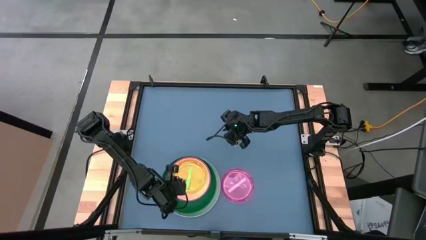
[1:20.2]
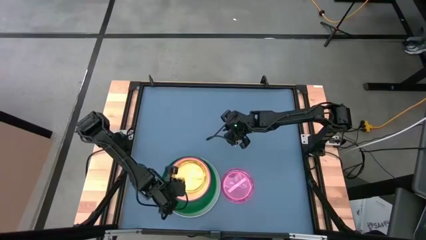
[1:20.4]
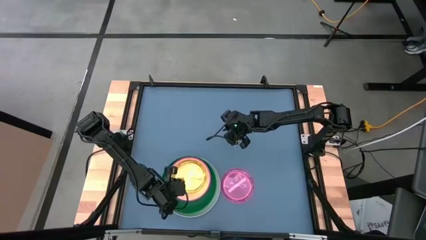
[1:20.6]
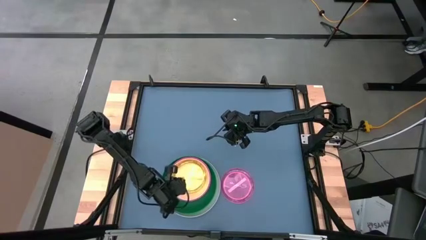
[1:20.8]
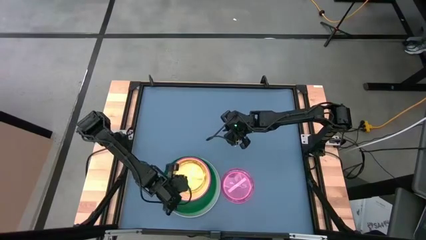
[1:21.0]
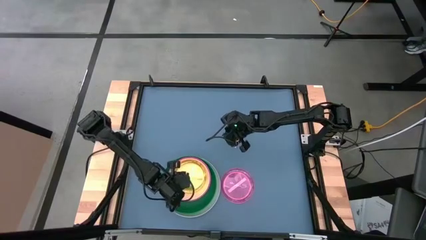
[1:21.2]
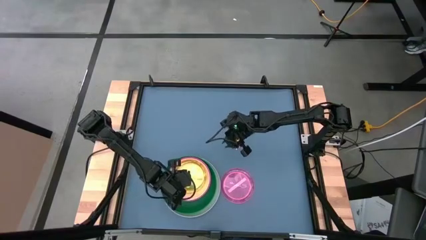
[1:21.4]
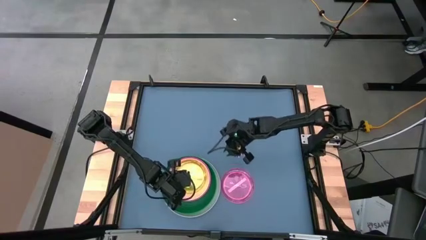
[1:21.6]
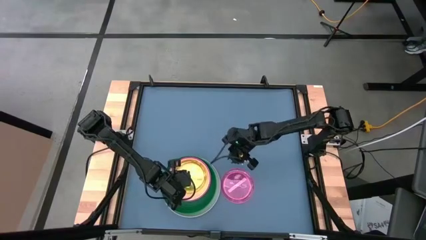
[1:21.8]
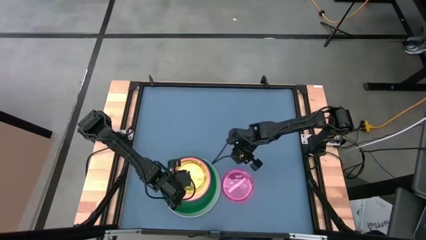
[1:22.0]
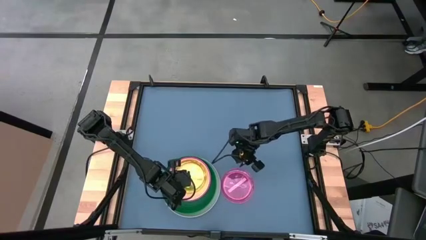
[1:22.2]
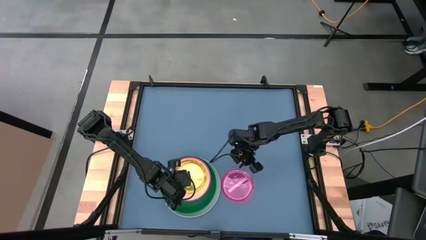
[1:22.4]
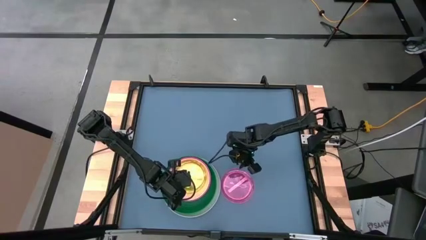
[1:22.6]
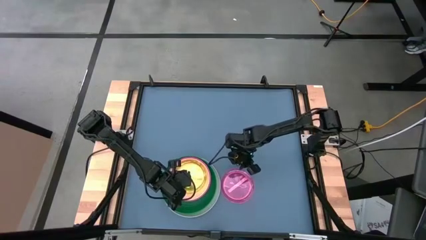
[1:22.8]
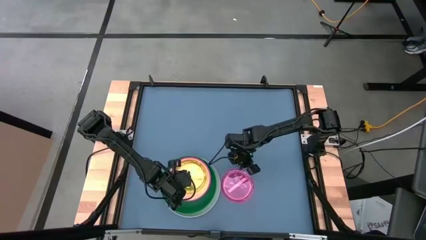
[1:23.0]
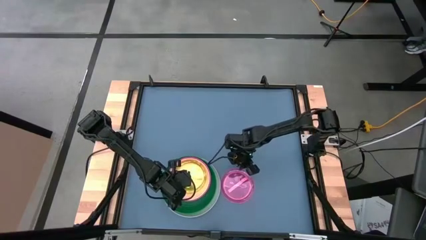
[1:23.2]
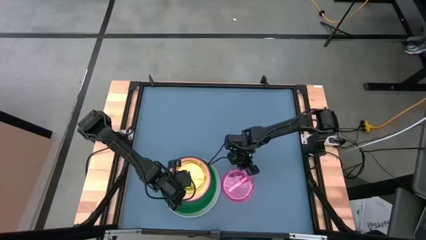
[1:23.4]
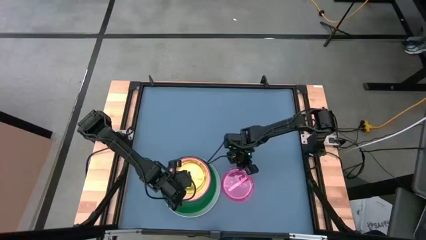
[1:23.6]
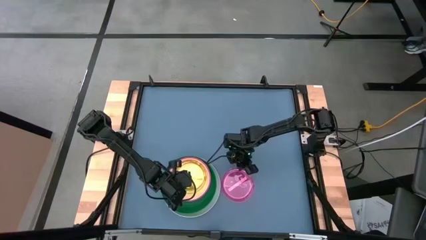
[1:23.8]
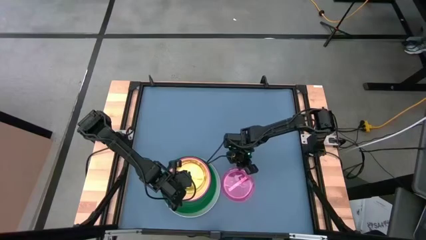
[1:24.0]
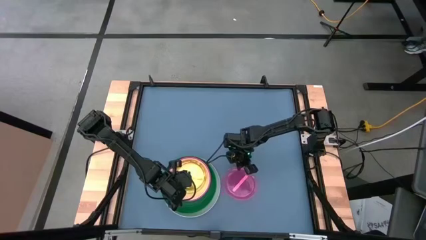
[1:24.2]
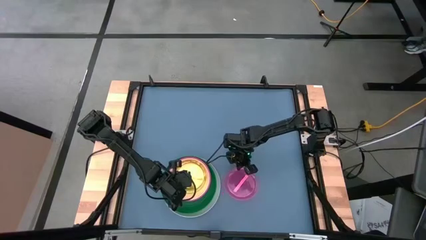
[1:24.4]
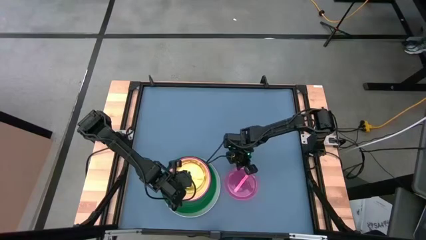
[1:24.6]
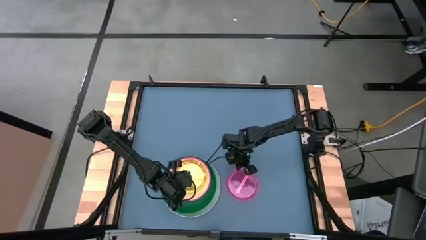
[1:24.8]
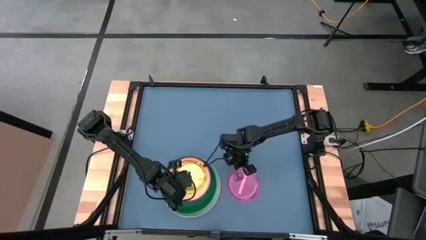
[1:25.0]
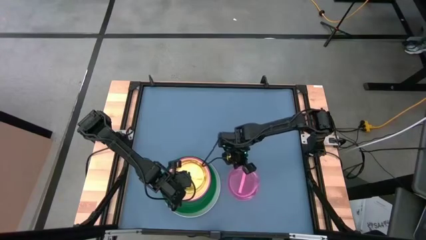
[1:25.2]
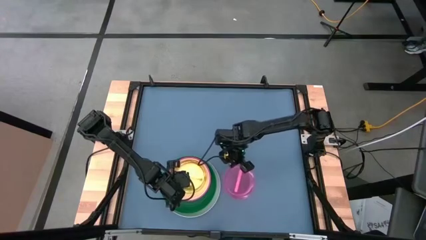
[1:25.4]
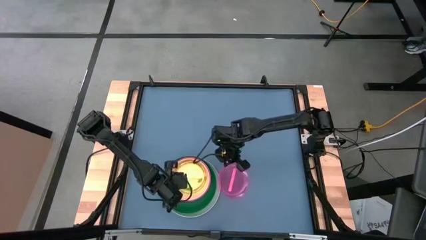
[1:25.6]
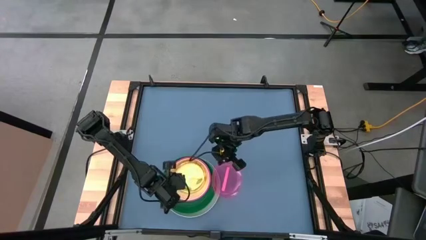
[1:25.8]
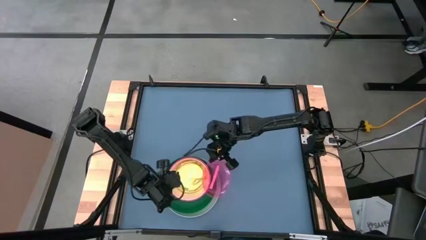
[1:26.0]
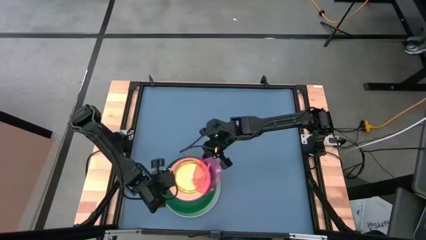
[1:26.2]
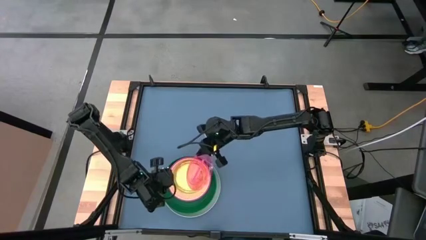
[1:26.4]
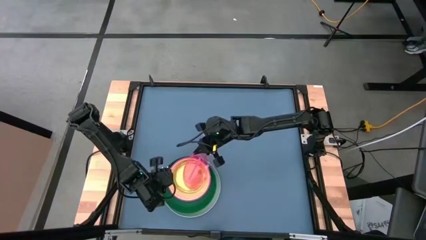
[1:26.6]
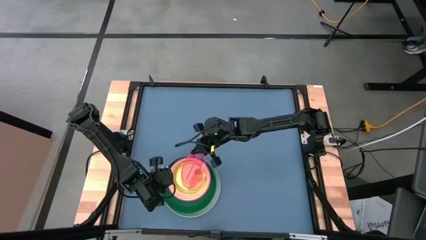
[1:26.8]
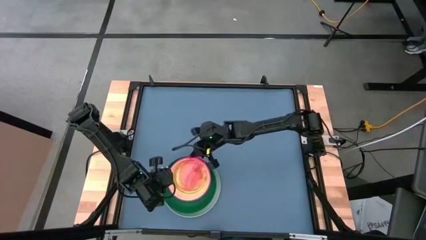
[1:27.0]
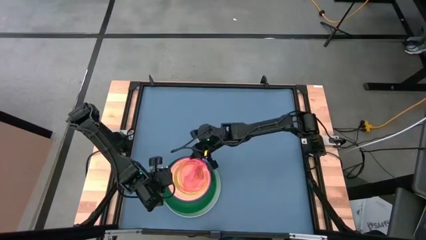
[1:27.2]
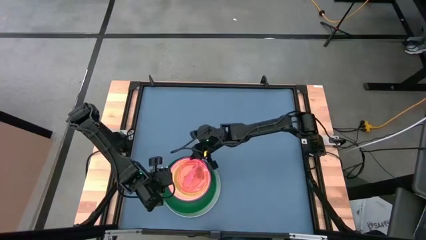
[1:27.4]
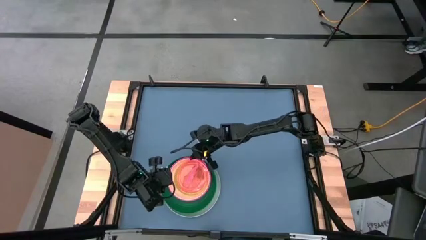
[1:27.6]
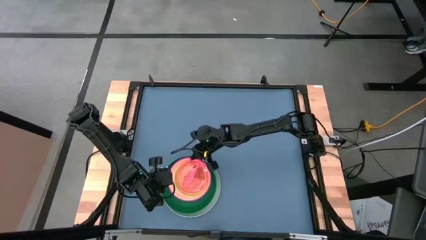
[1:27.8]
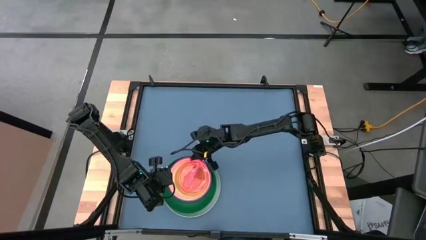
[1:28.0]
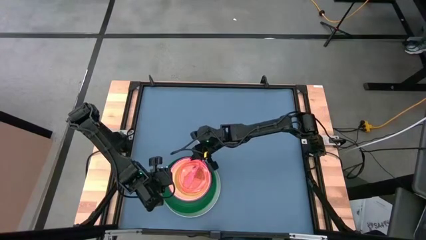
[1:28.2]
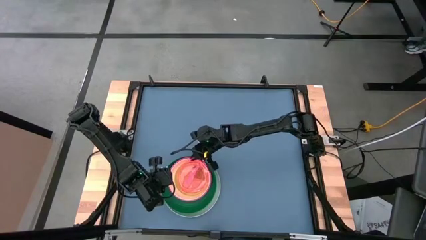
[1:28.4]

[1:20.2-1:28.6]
Task: Stack plastic plates
Stack the light pink plate on top of the light green plate

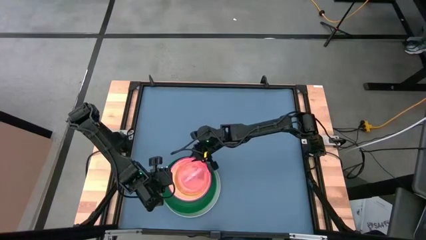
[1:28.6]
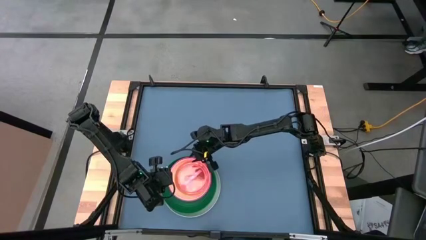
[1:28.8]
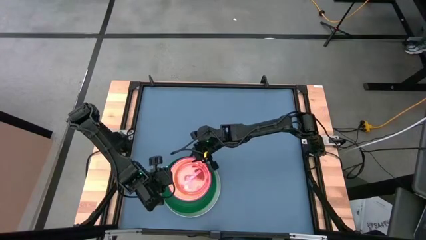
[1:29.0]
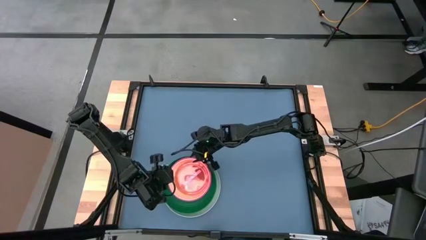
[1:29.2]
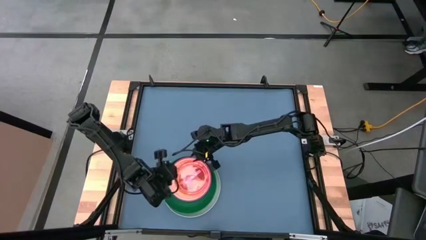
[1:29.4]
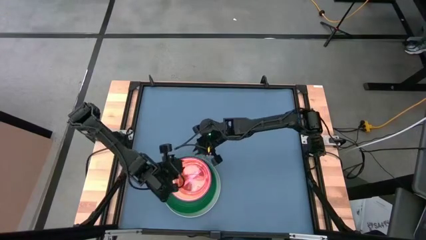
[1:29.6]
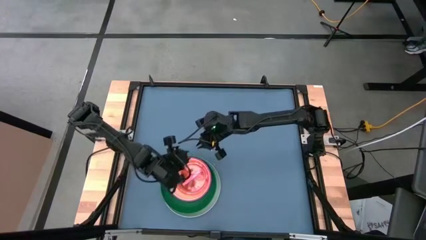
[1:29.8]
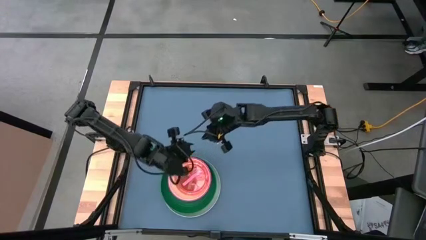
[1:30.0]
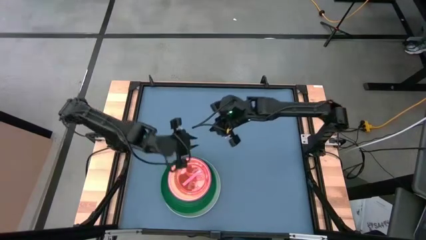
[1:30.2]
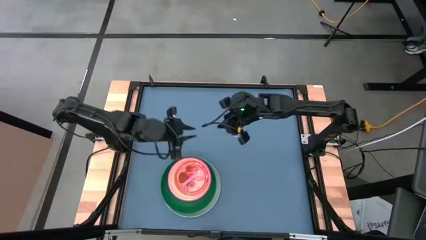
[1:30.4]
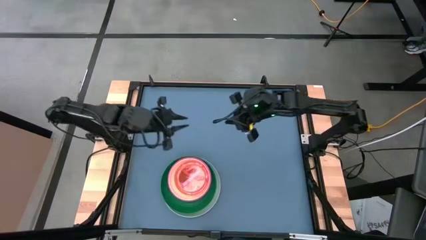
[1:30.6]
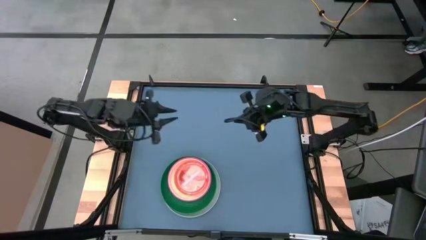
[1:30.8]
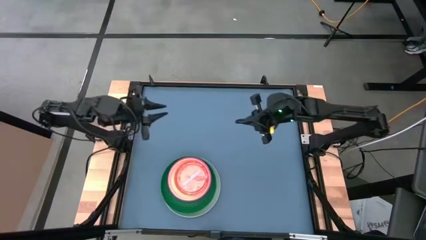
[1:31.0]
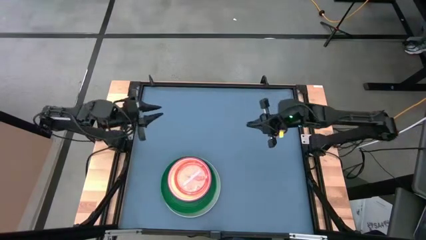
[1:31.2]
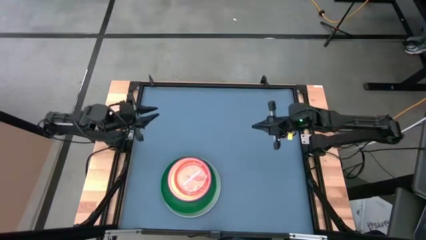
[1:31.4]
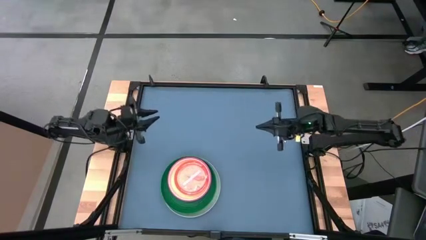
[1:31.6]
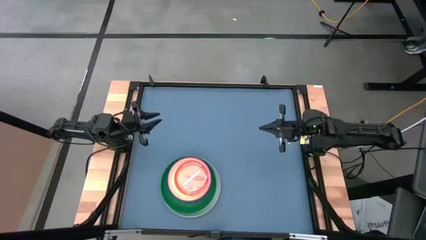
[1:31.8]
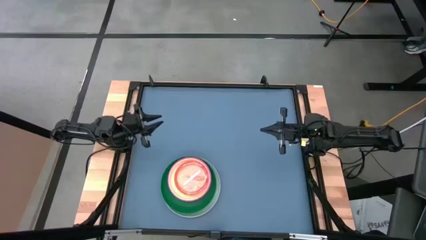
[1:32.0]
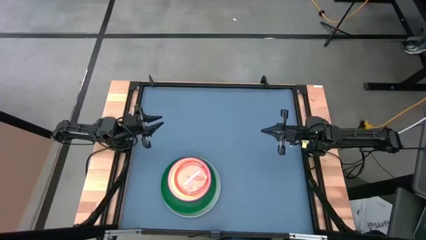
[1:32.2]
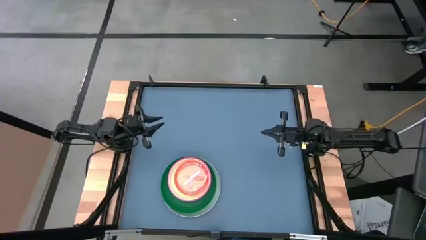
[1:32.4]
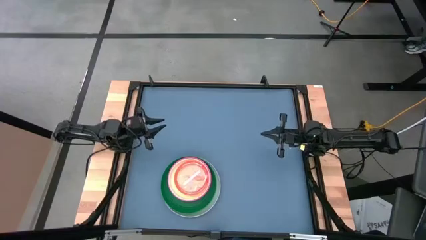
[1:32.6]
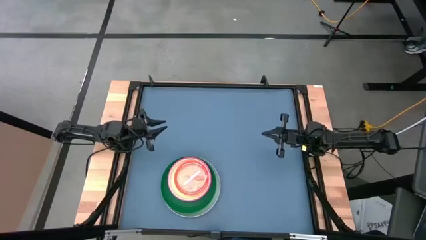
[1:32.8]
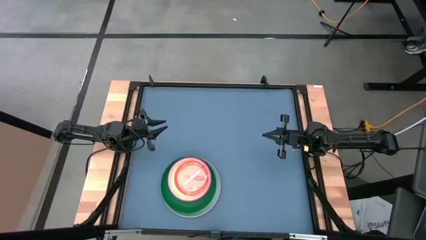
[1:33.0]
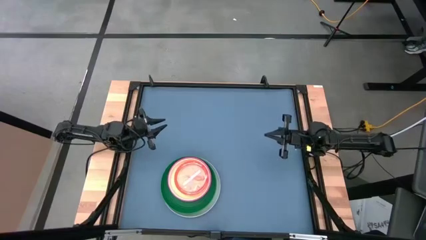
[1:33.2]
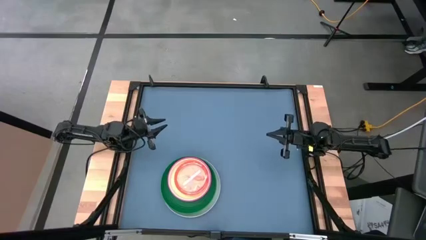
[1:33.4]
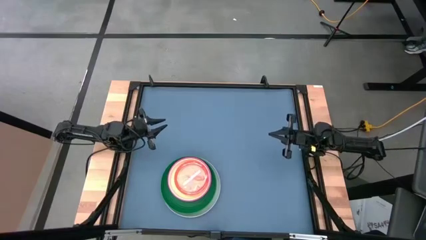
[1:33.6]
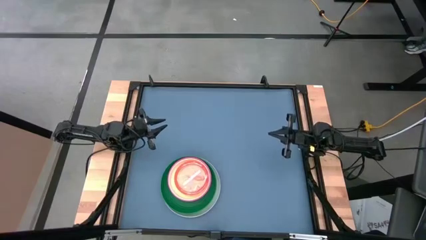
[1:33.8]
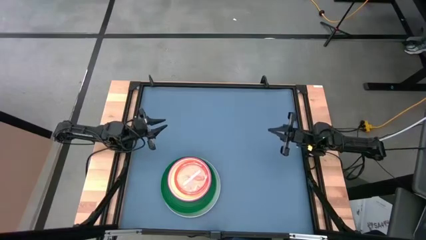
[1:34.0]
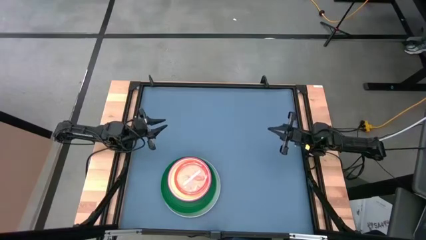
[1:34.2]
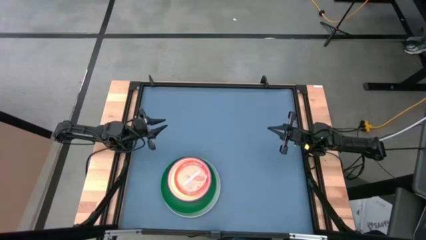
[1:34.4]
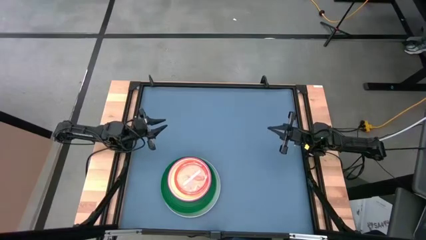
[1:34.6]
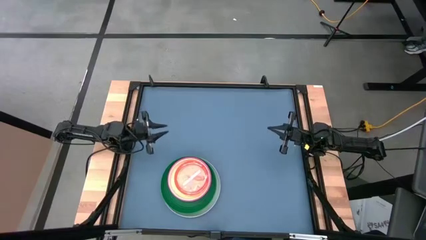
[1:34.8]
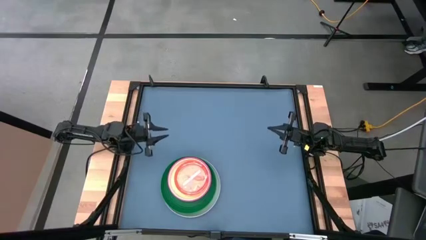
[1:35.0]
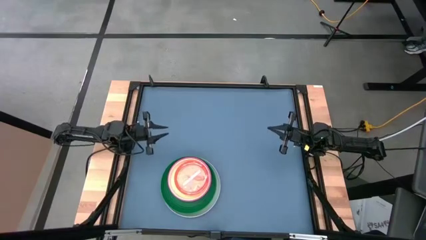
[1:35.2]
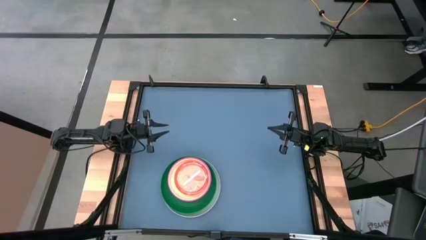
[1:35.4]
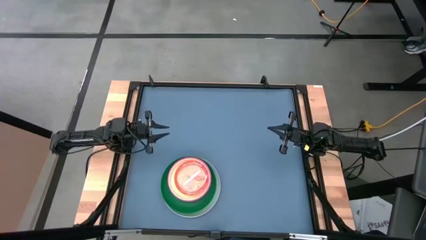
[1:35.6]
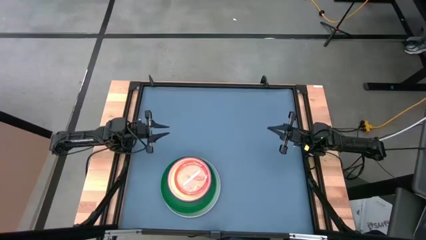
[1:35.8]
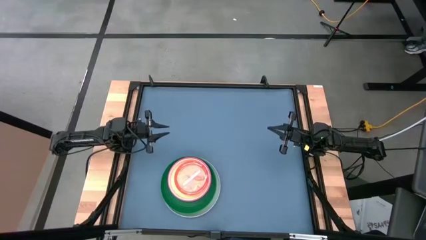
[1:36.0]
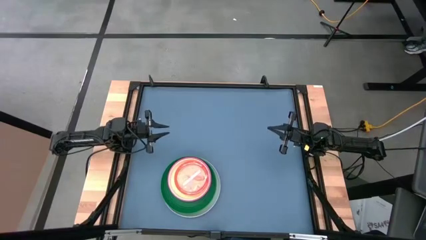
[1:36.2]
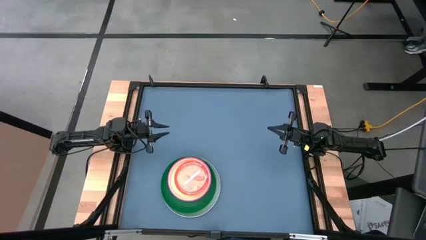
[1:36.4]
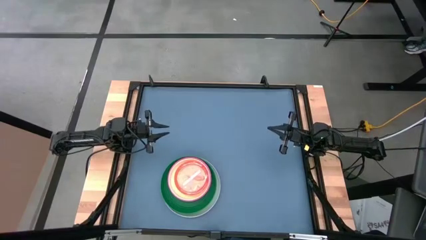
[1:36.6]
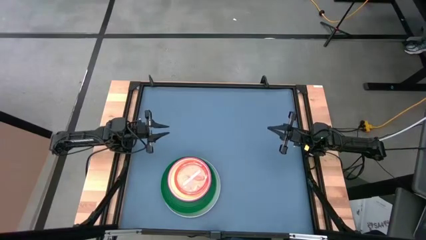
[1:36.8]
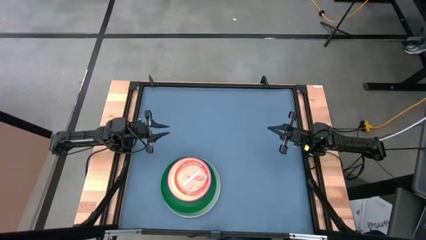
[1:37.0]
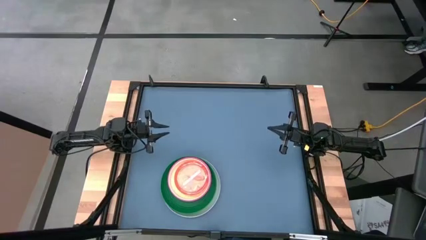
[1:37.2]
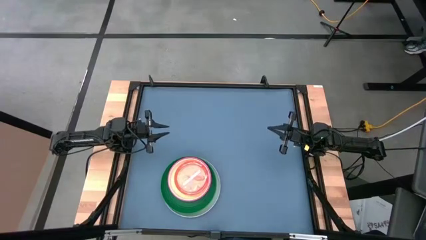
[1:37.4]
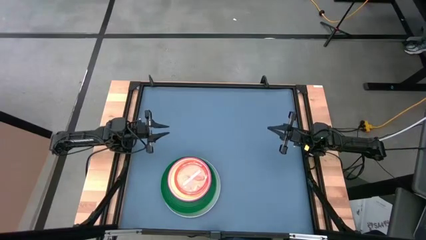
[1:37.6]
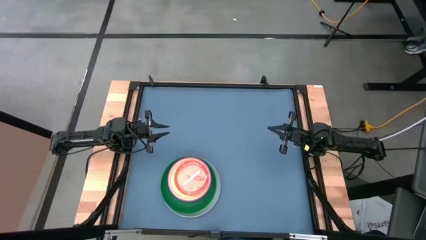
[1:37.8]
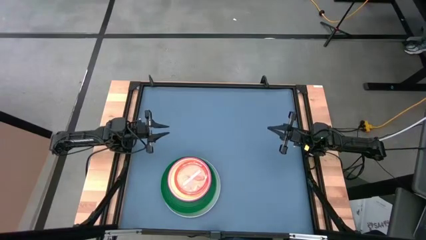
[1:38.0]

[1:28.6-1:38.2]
Return to Home Position
